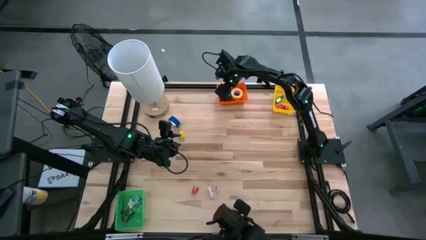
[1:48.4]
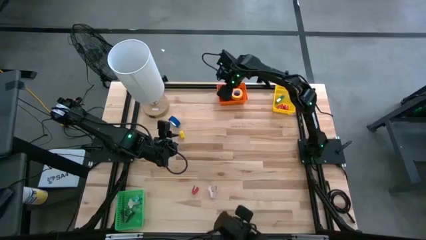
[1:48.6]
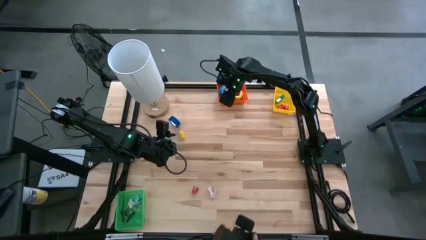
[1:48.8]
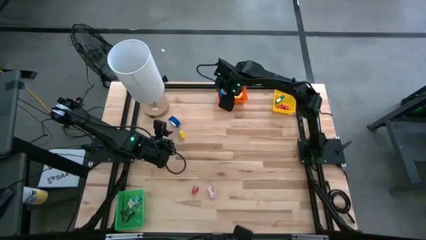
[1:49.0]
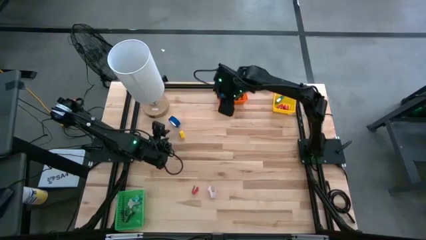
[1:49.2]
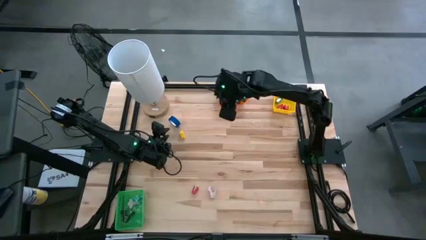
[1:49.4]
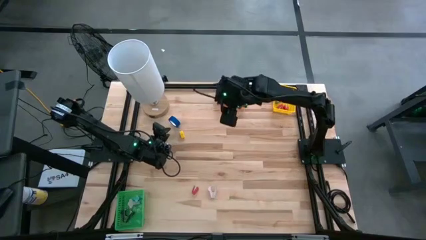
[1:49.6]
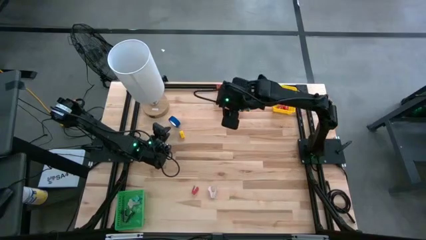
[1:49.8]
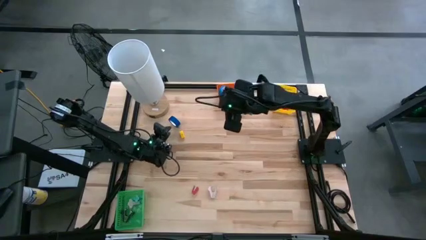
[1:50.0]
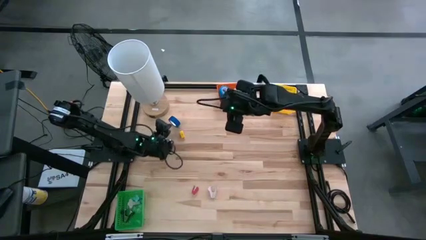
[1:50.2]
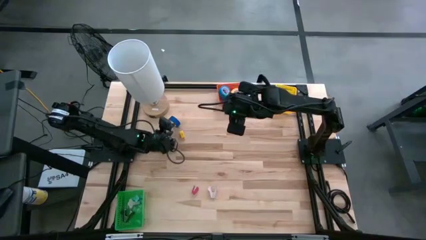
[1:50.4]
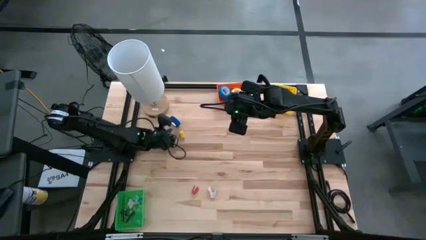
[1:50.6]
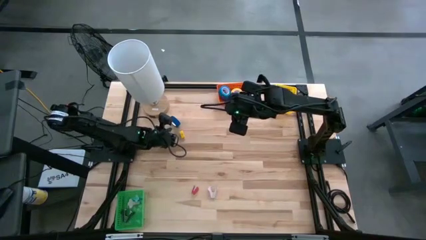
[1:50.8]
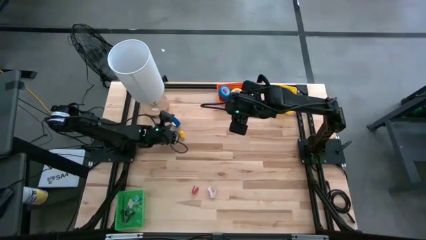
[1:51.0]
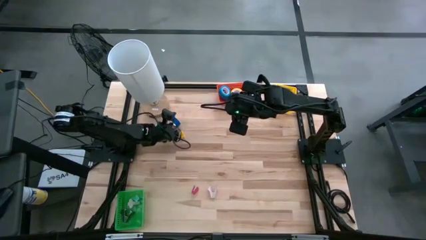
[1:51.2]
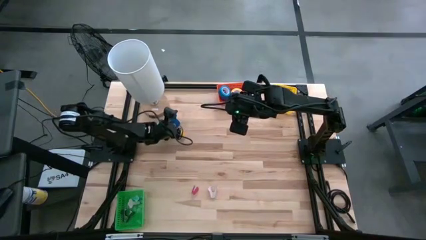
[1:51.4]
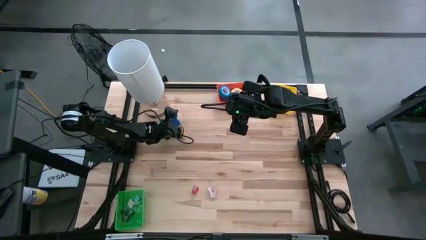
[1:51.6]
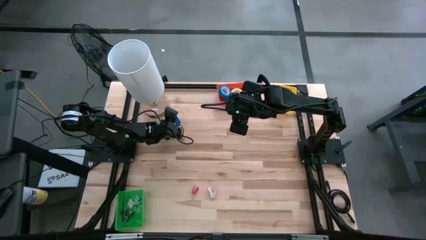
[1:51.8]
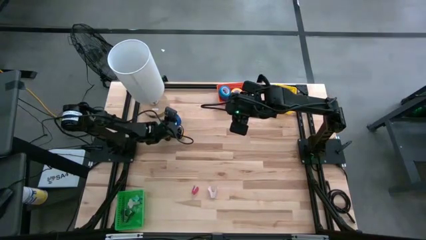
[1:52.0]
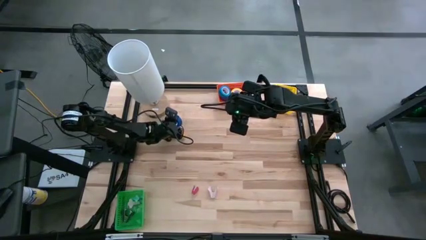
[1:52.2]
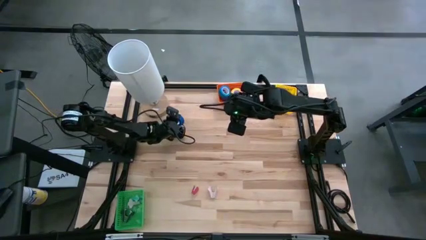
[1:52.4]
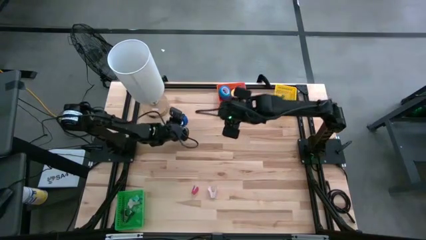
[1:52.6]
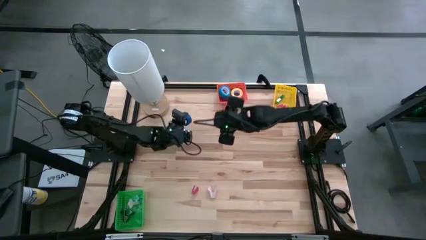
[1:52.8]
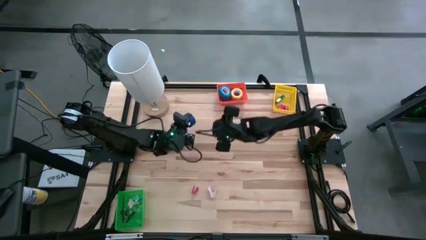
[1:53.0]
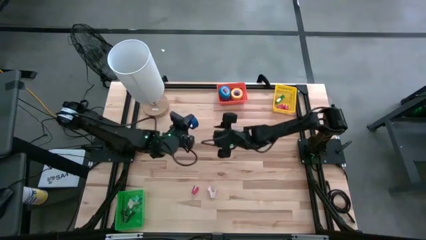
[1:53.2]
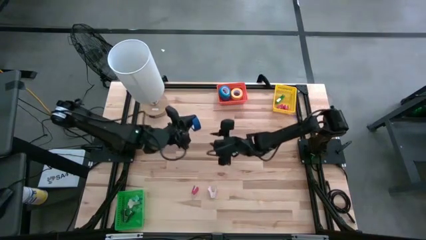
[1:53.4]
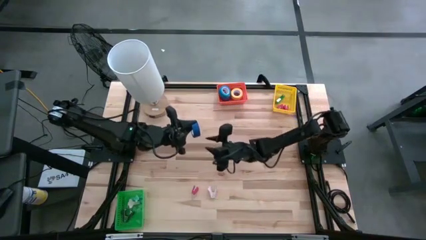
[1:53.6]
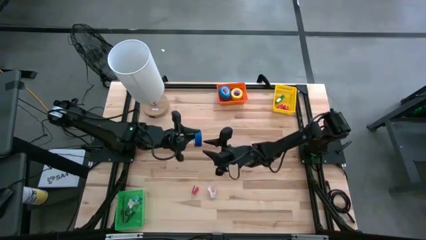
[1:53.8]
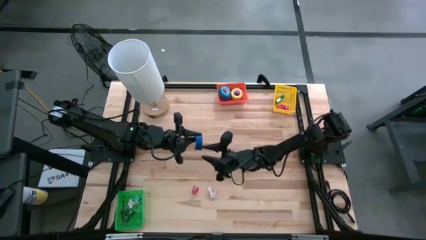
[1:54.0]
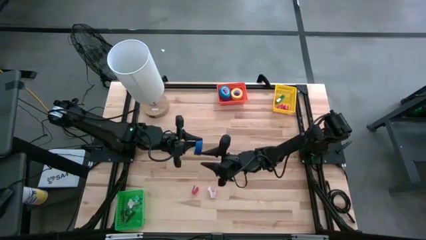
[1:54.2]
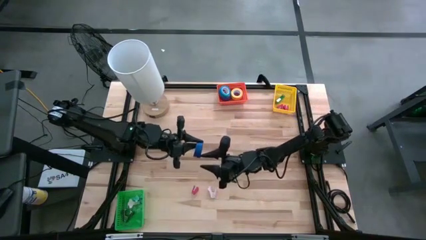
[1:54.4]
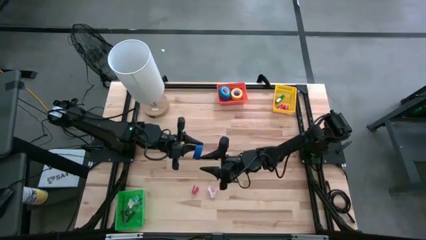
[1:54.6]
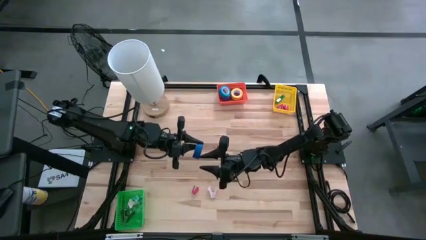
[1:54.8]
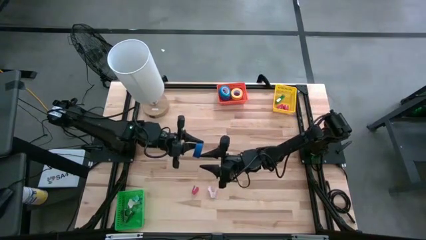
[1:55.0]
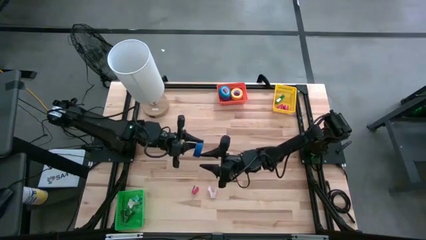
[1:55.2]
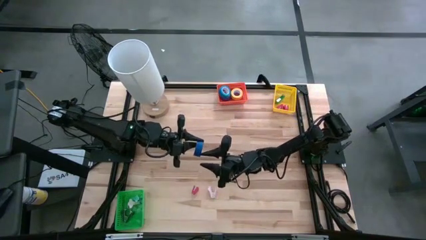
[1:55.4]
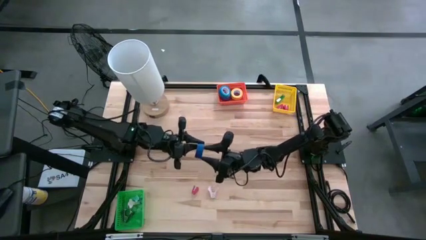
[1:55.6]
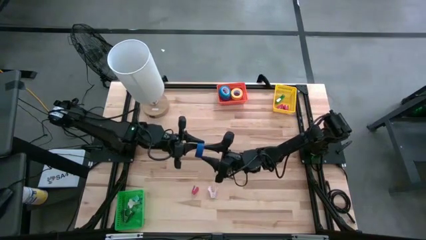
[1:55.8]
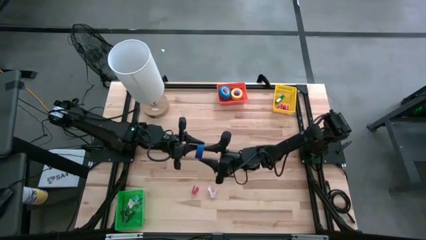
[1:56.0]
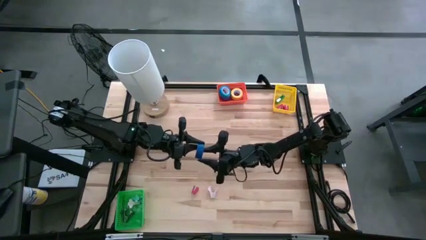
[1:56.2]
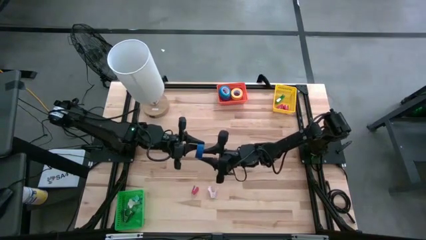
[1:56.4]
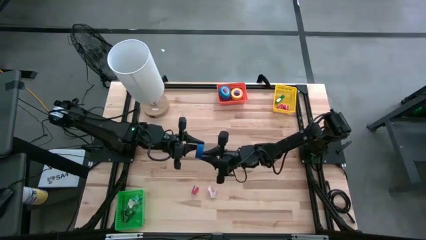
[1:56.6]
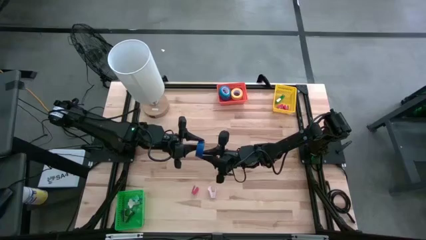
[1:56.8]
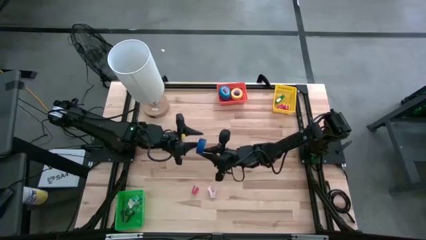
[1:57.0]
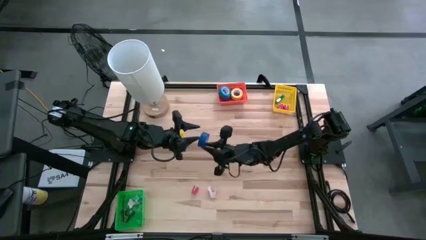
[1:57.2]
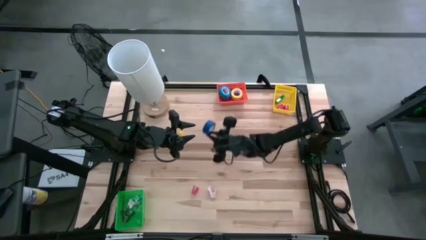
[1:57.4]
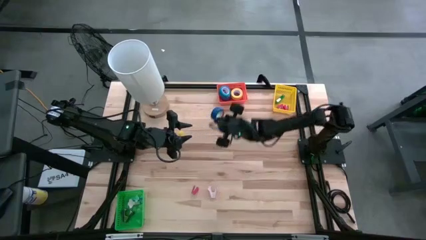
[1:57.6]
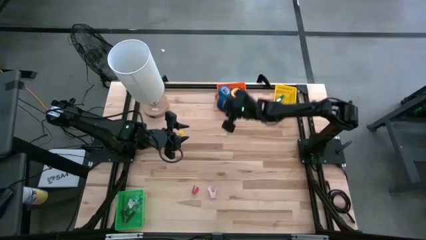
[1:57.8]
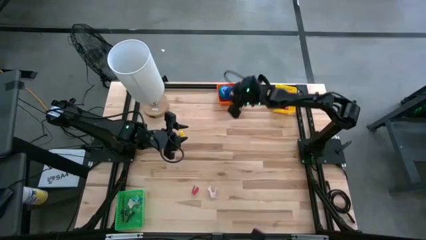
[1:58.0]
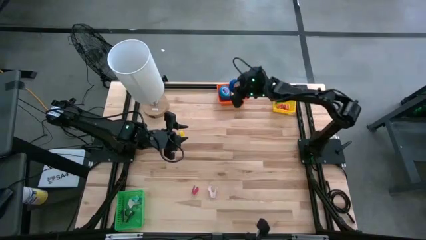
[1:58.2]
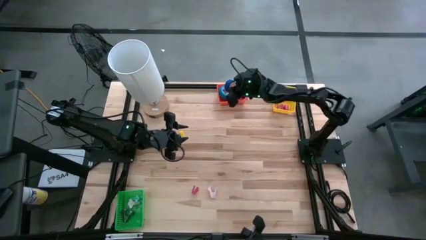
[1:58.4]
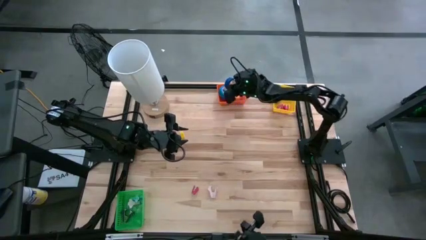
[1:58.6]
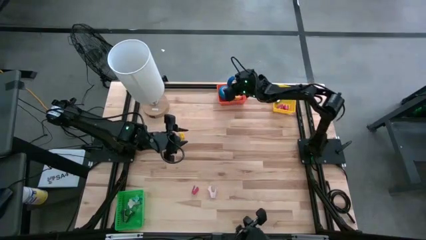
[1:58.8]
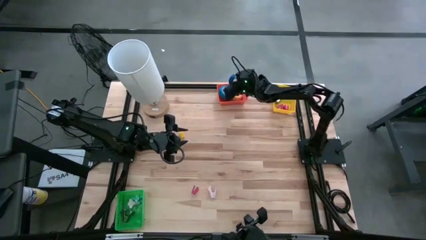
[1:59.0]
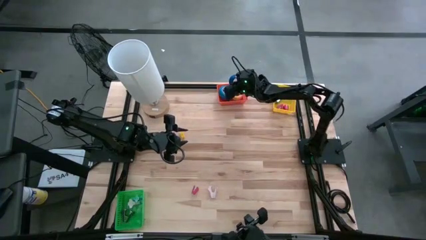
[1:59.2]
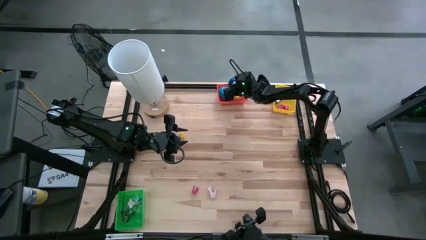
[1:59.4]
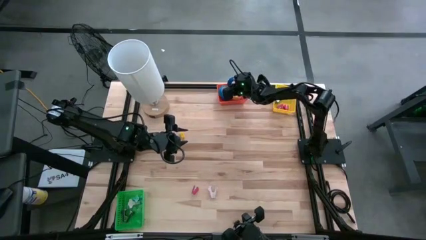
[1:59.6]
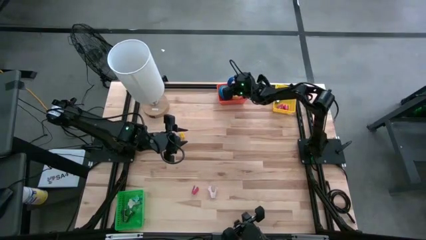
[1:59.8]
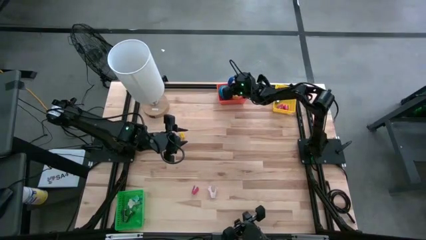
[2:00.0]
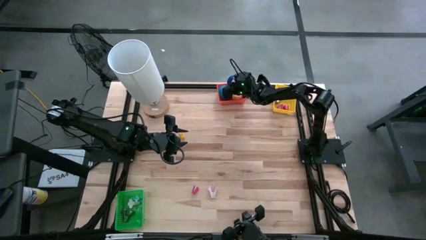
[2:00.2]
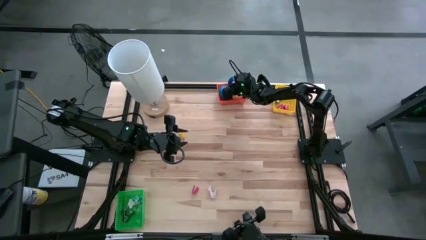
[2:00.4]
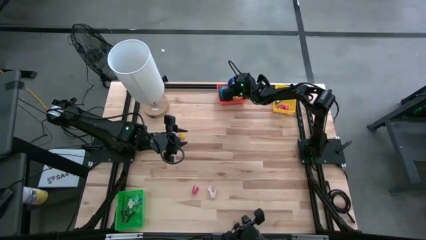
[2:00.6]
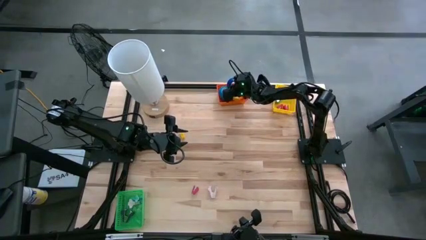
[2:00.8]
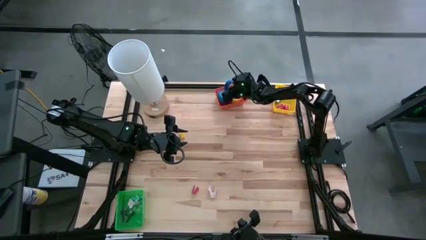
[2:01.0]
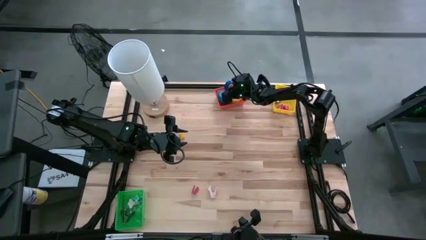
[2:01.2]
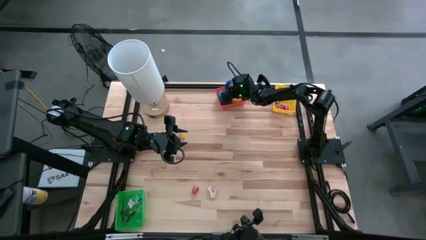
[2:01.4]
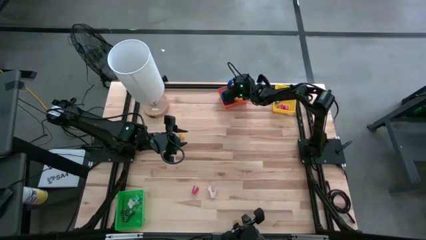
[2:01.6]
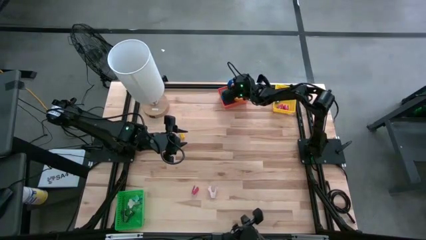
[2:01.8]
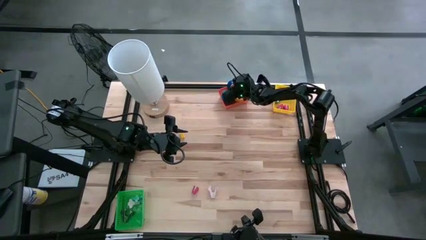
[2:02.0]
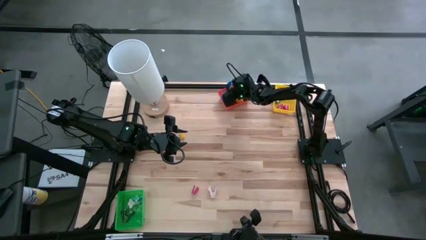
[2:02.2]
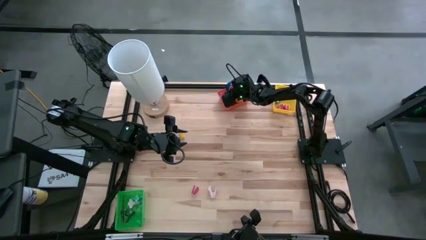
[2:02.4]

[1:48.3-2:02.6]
Task: Pick and place Stapler, Stapler remover, tape
Put the dark blue tape into the orange bin

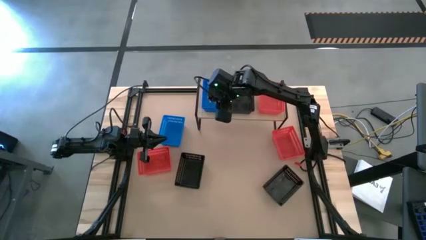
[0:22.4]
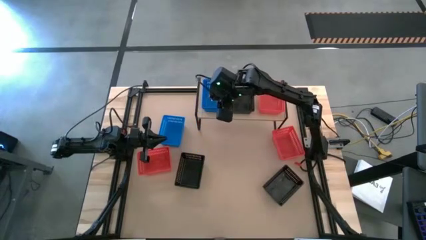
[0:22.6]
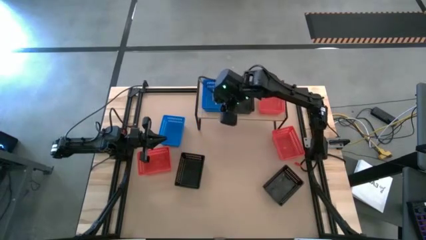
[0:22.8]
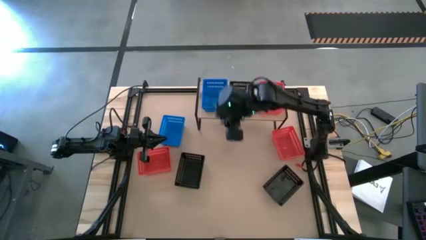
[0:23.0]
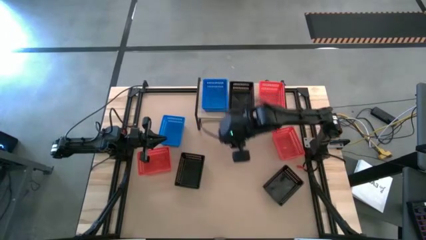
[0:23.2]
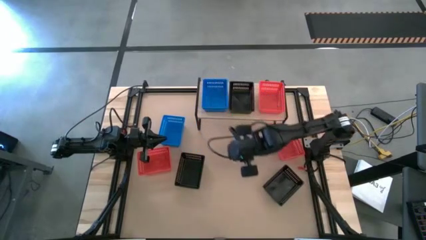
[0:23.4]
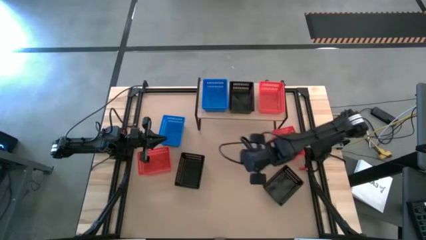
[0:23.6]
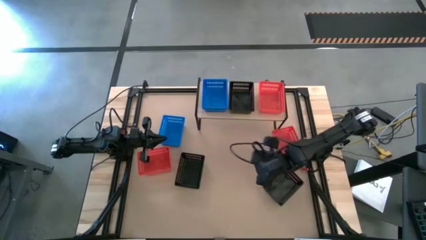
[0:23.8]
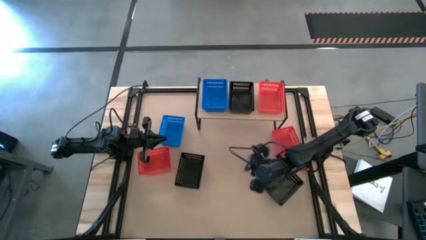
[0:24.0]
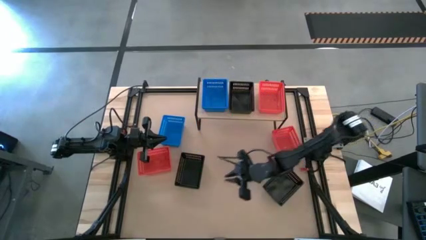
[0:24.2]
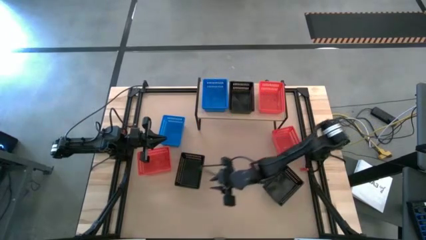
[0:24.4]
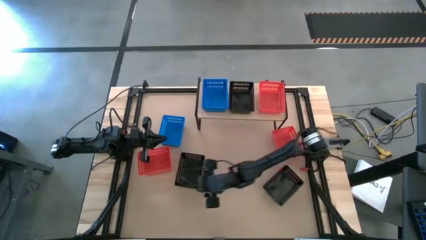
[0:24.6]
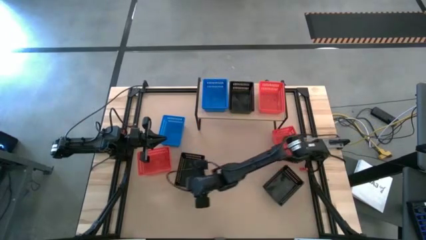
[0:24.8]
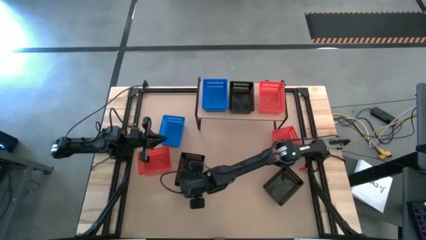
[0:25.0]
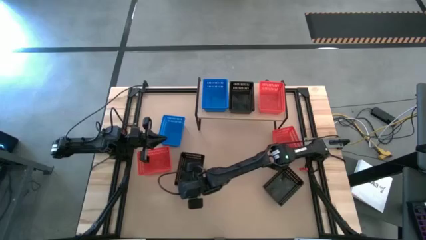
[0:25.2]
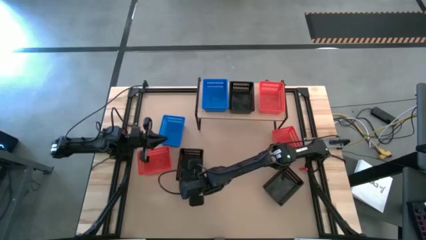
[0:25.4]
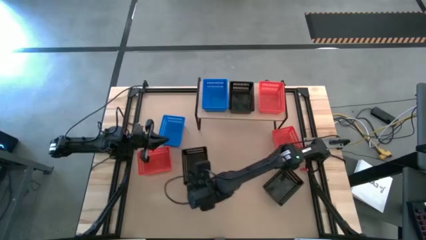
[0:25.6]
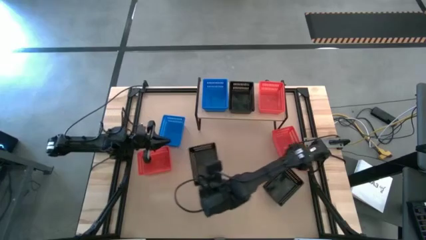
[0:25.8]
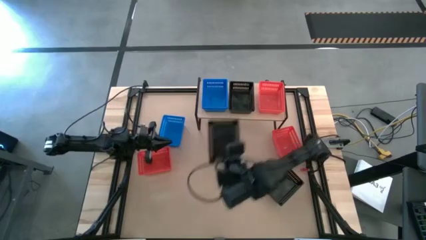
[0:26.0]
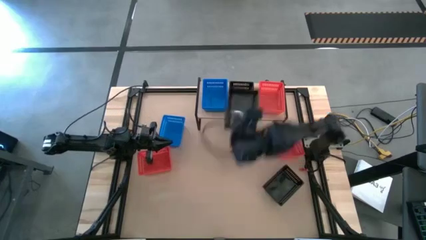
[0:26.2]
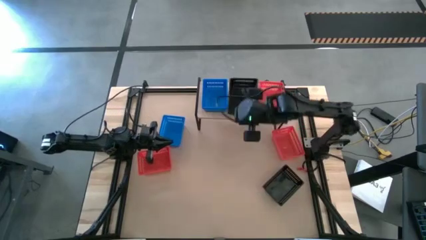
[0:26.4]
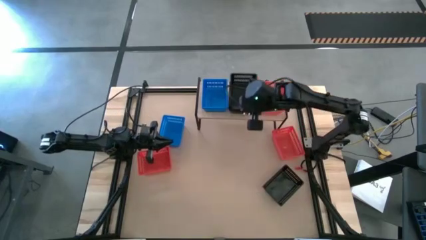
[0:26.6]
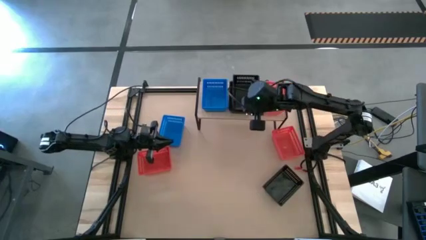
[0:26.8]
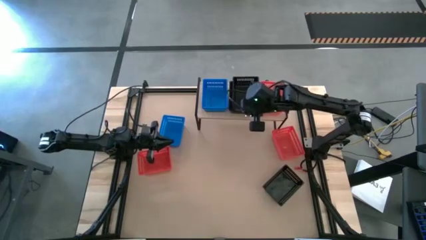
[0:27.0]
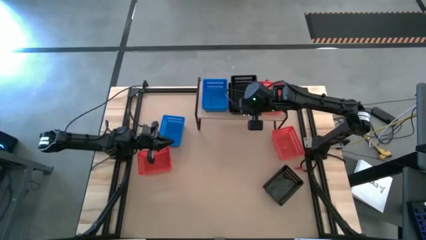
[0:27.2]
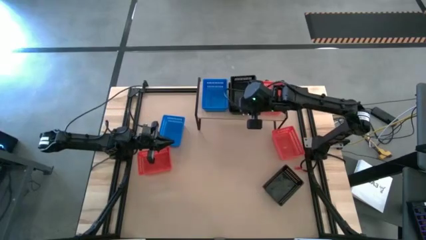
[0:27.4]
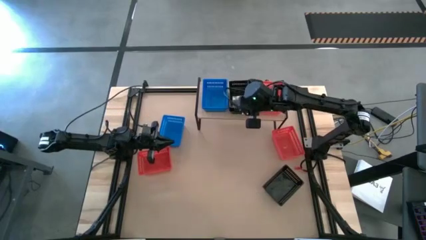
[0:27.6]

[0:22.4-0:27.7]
Task: Stack baskets on shelf by color
Stack the left black basket on top of the black basket on the shelf
